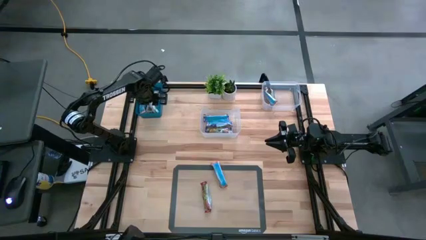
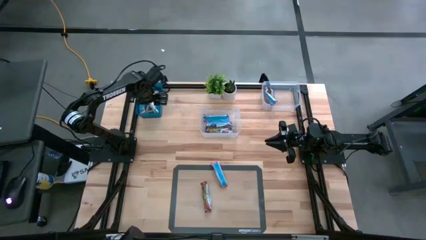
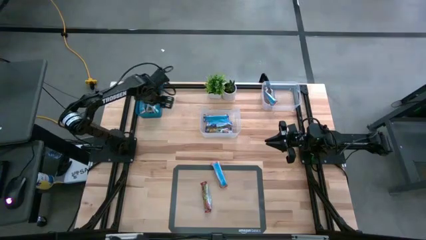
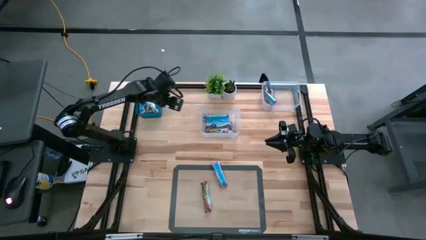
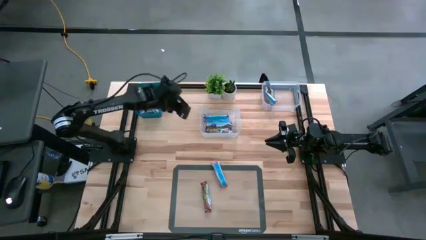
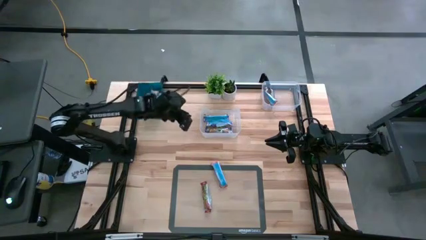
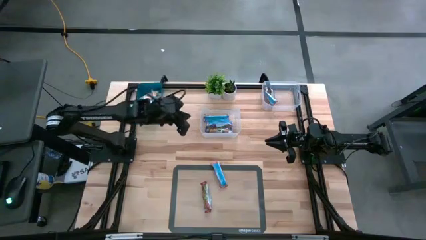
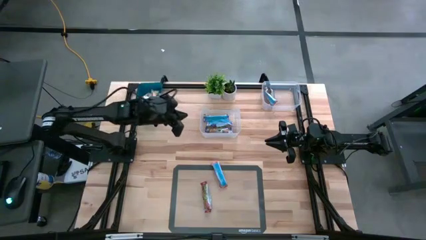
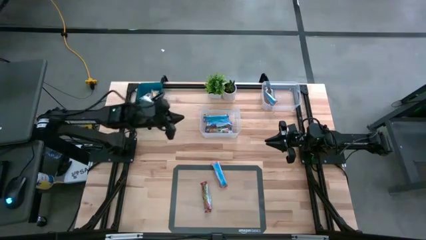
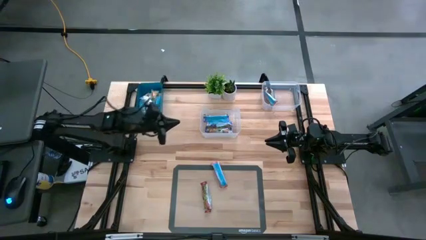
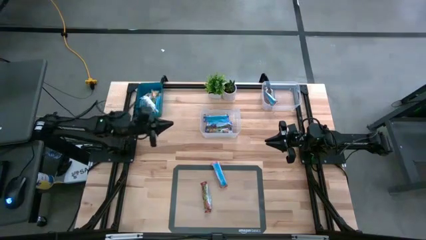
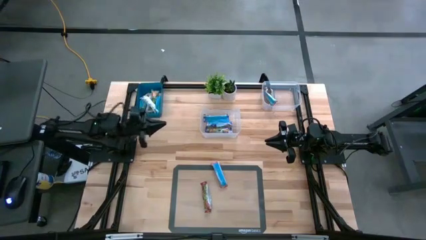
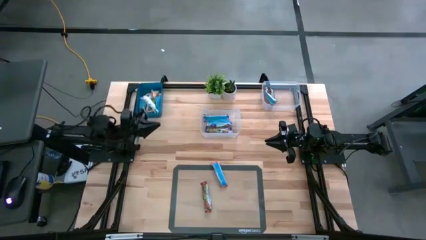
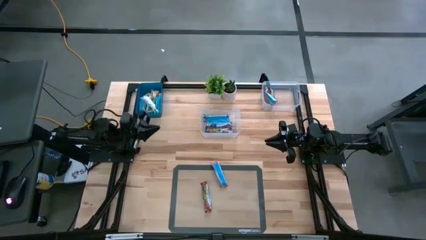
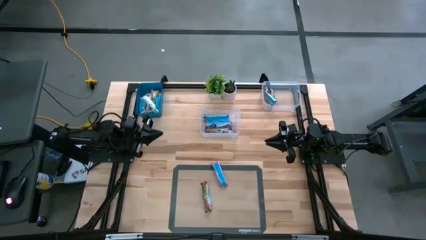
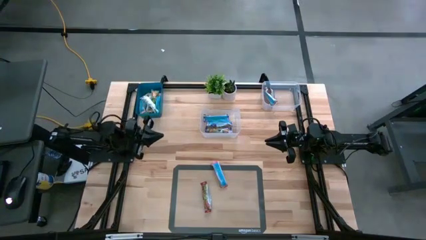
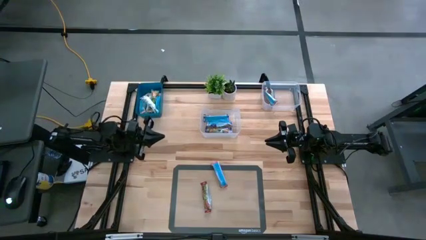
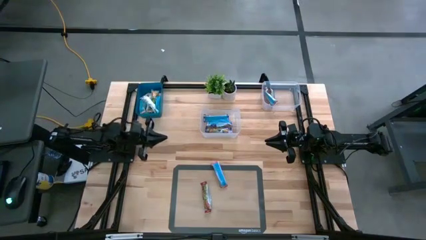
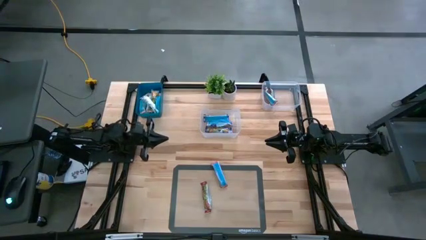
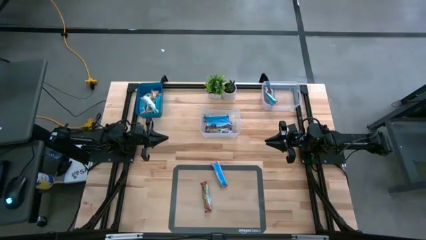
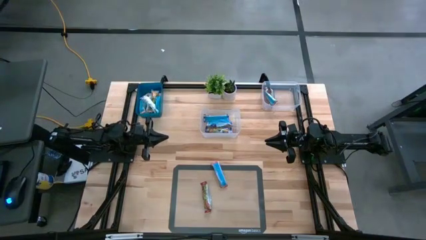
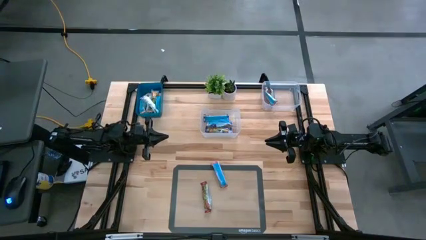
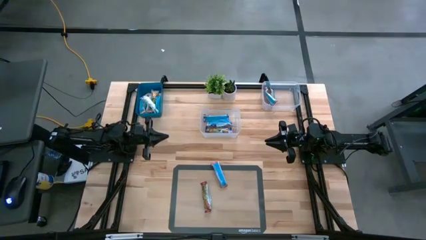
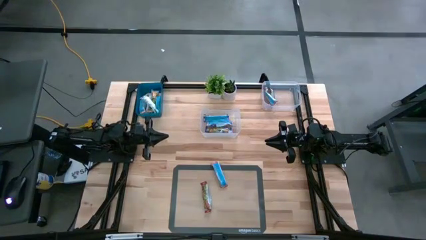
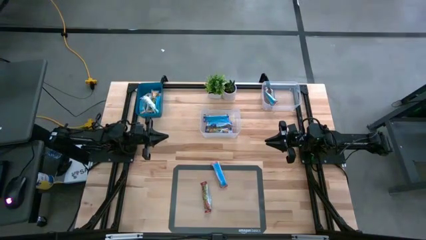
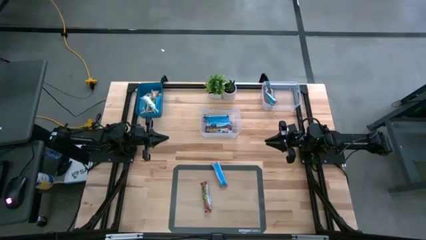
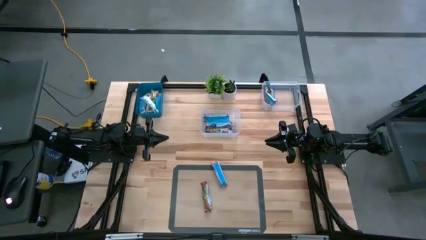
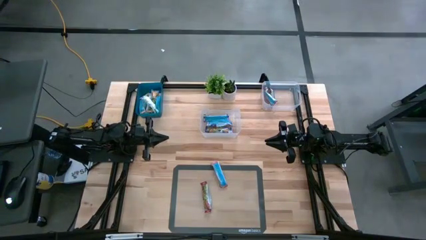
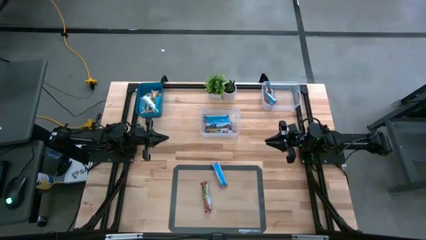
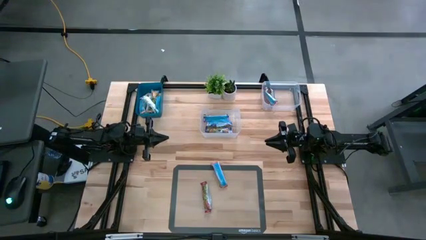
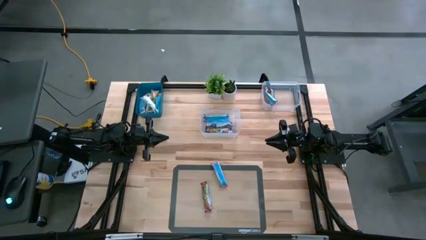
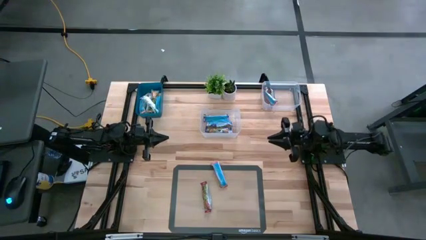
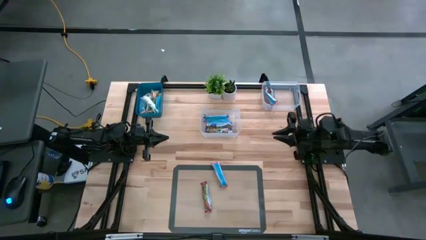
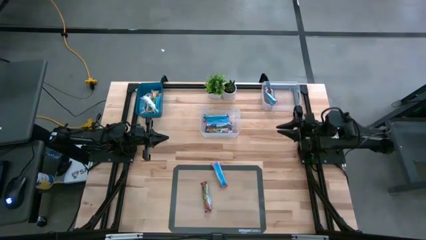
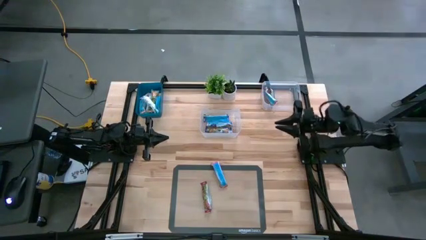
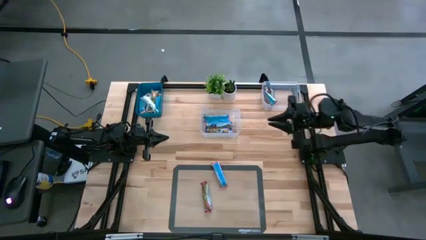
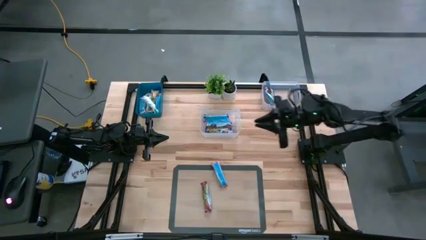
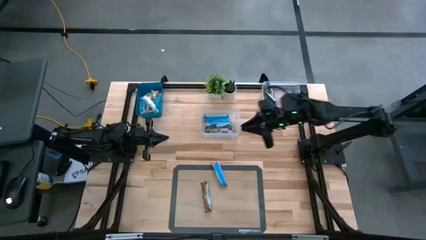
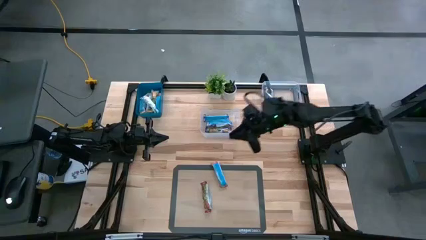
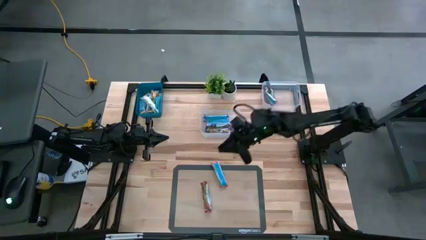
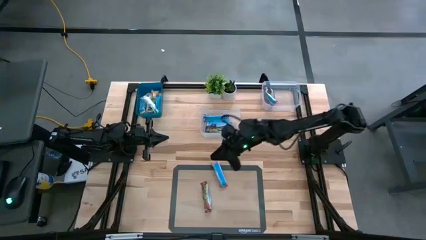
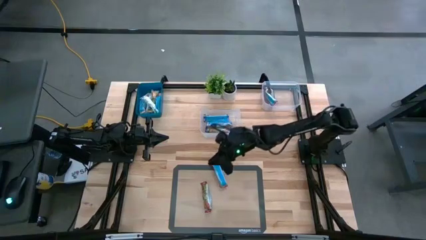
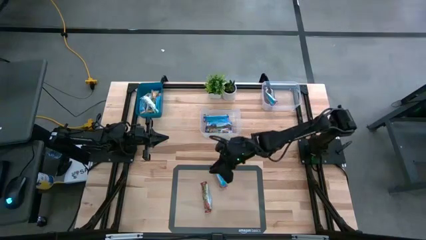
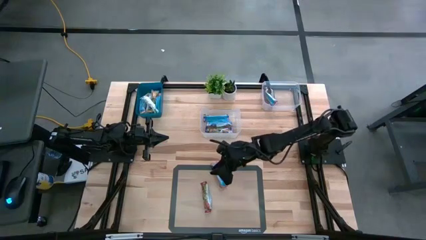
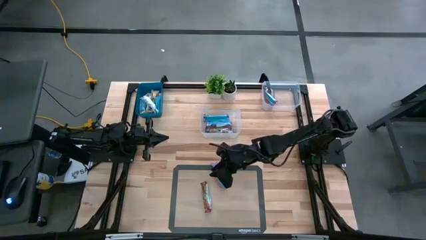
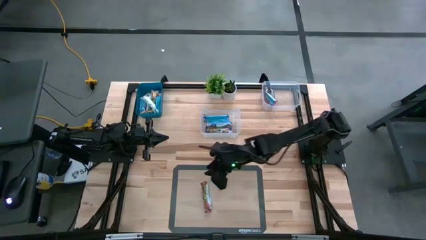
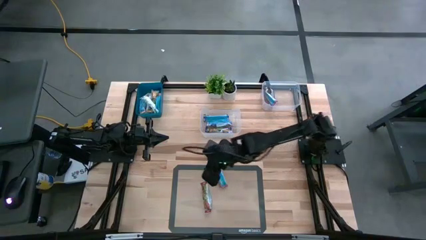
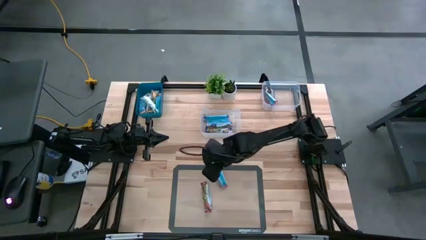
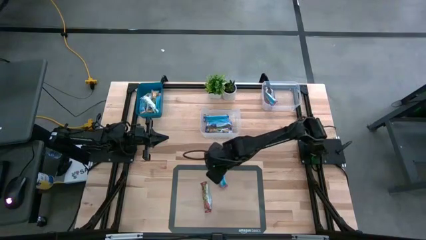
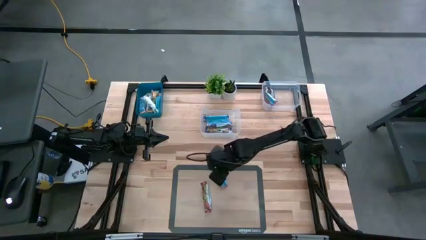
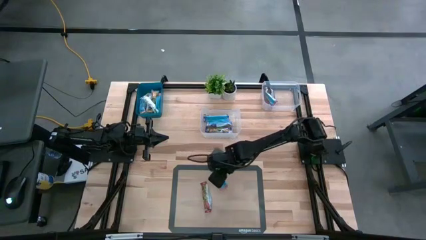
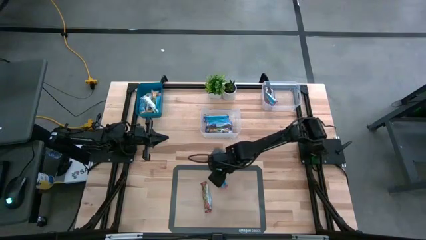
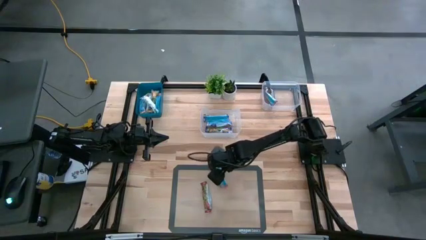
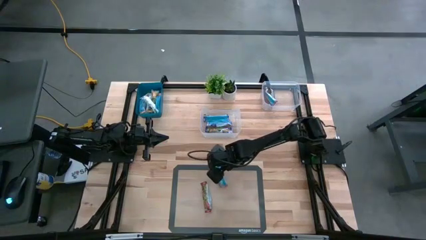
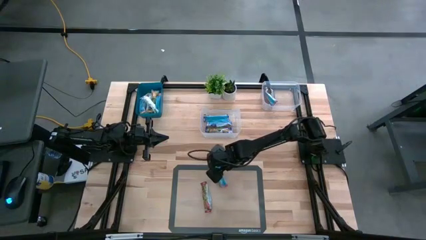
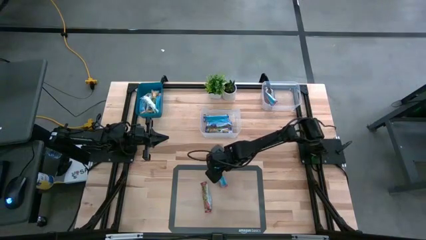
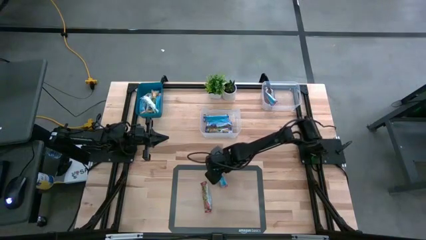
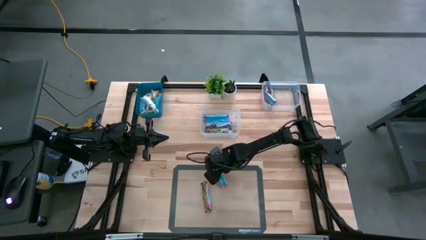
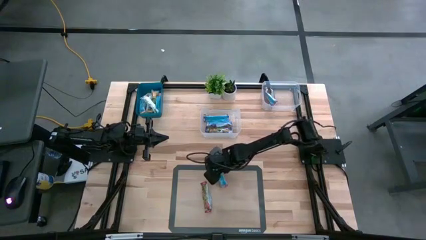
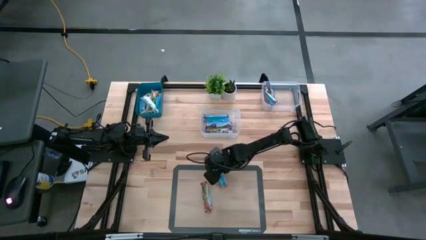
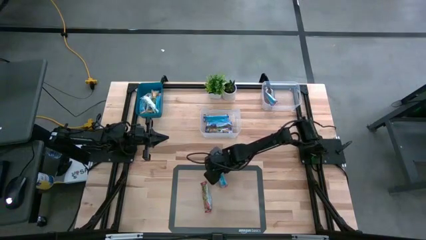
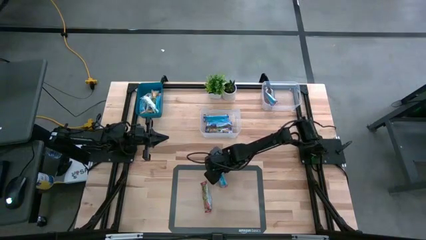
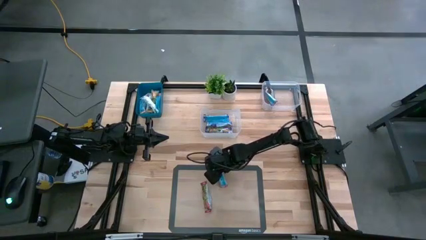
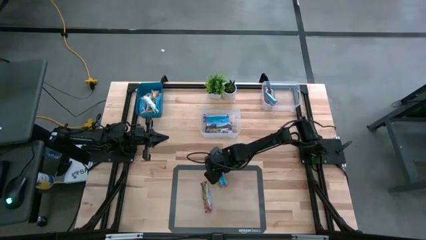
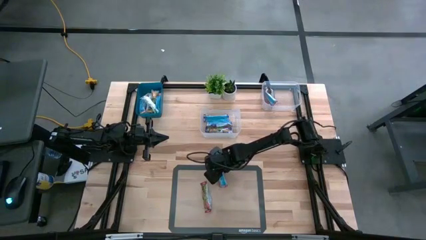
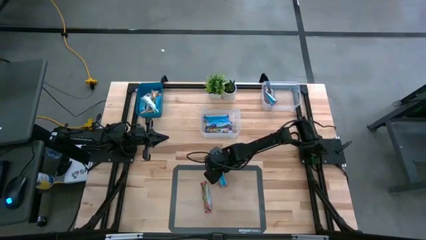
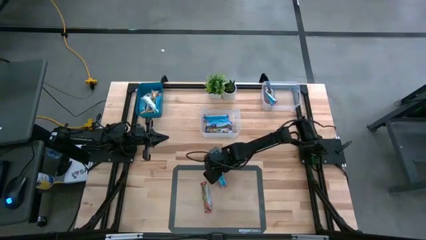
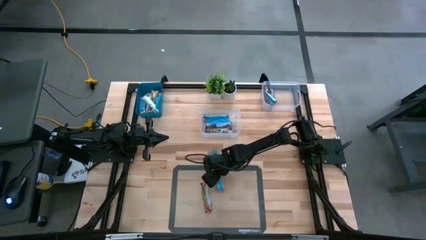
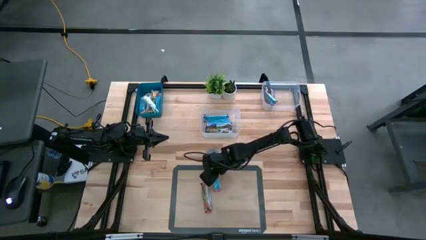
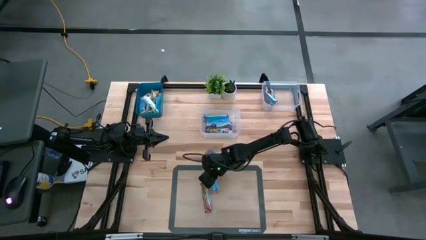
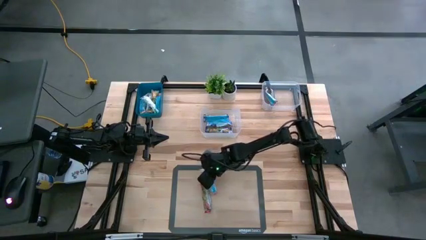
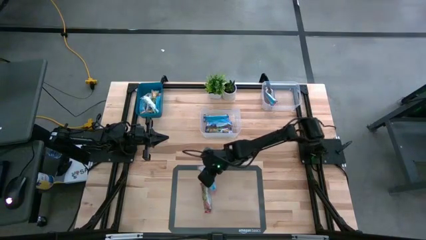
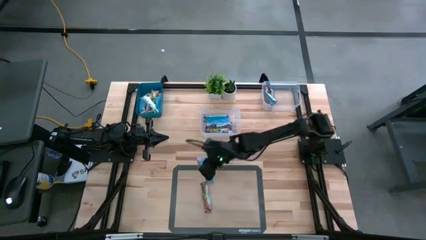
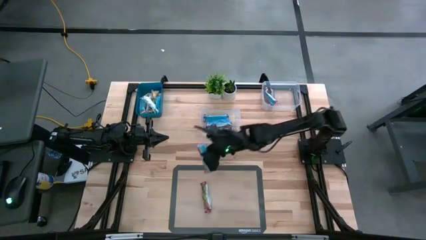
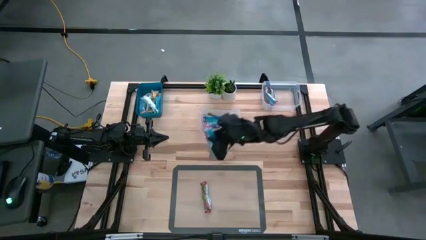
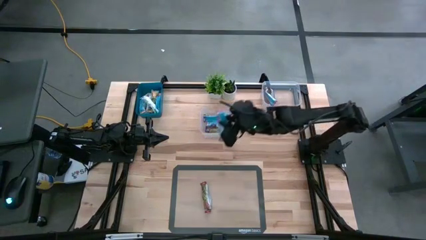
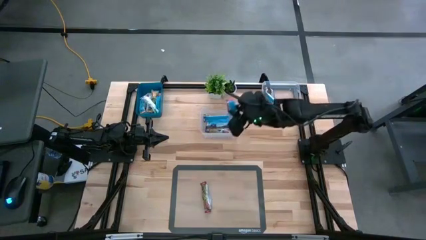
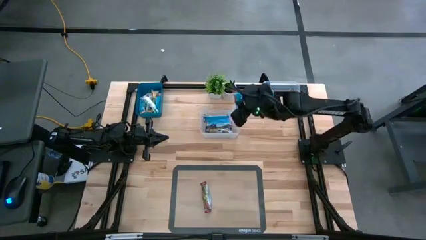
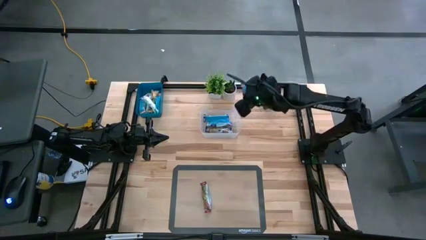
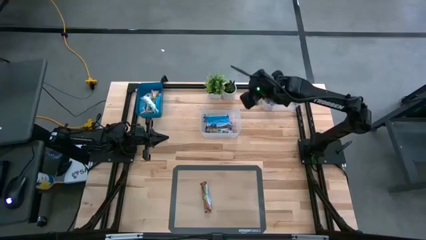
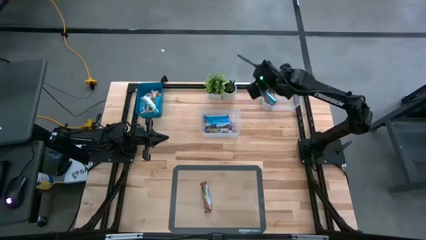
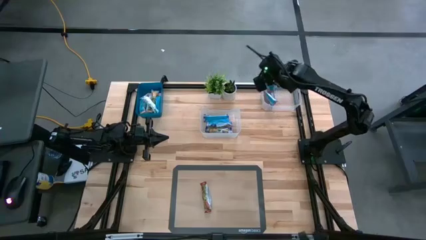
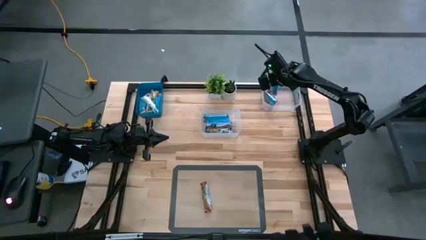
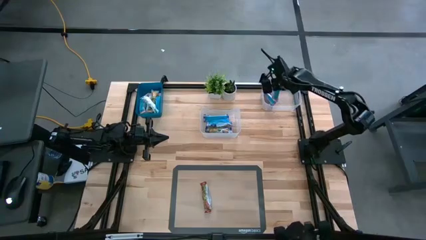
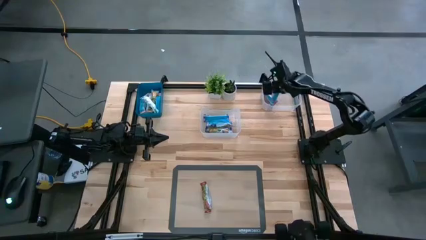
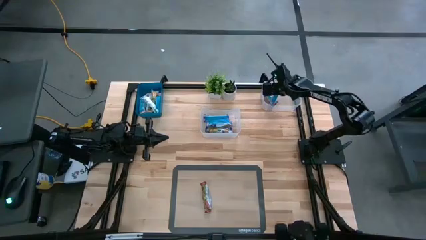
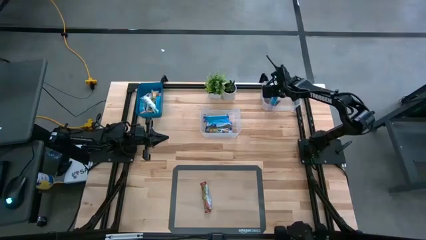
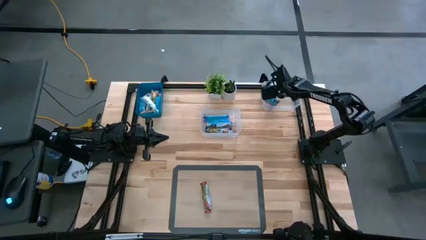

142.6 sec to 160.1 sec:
Task: Pick and place Granola Bars by type
Put the red granola bar in the right transparent bin
